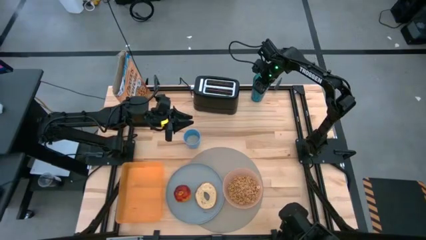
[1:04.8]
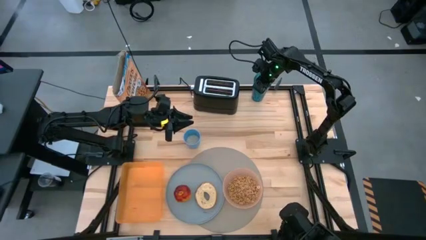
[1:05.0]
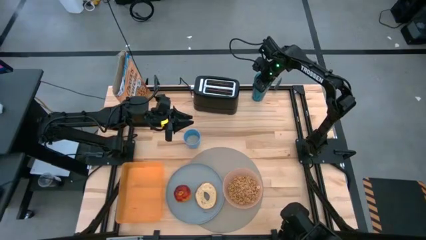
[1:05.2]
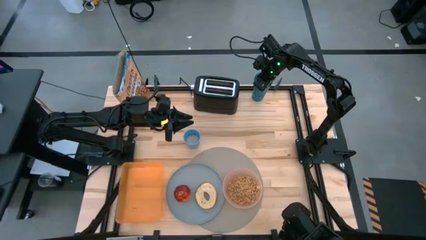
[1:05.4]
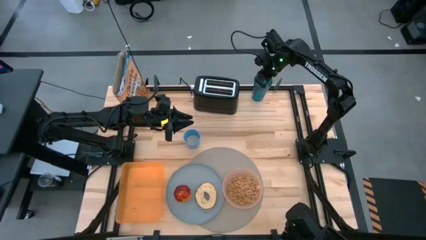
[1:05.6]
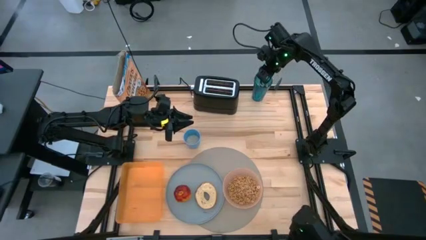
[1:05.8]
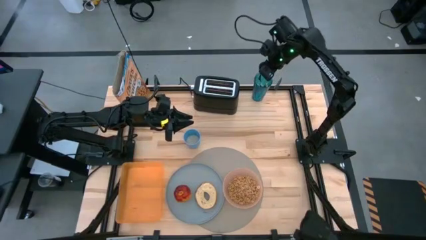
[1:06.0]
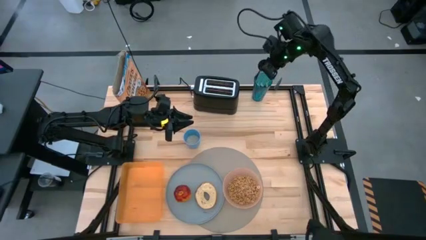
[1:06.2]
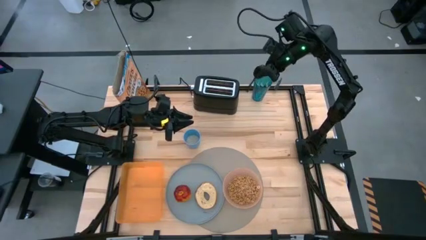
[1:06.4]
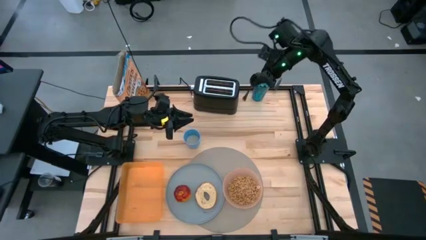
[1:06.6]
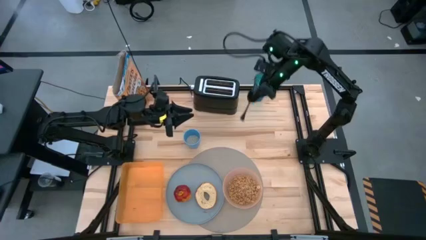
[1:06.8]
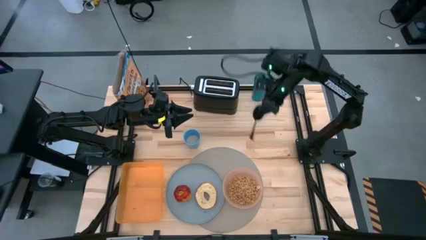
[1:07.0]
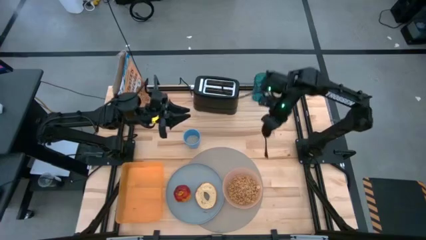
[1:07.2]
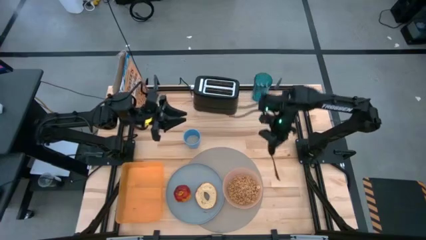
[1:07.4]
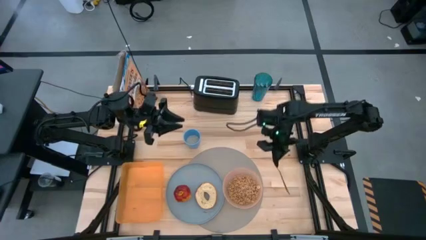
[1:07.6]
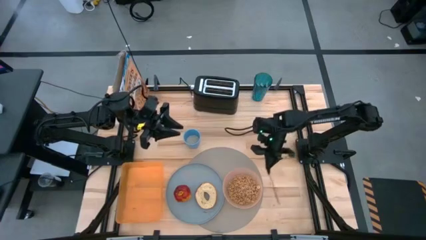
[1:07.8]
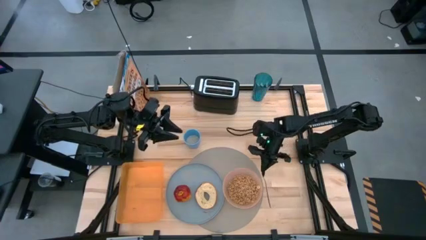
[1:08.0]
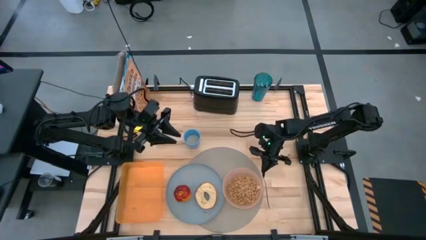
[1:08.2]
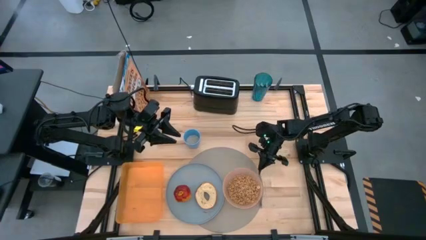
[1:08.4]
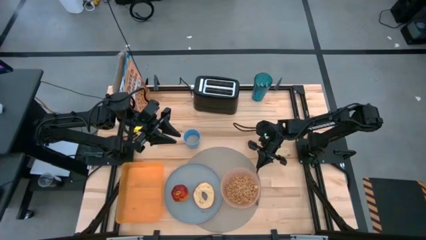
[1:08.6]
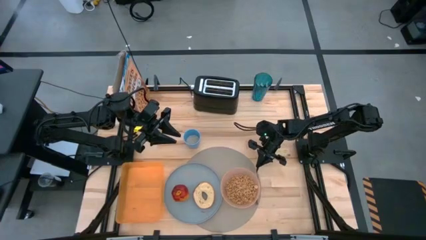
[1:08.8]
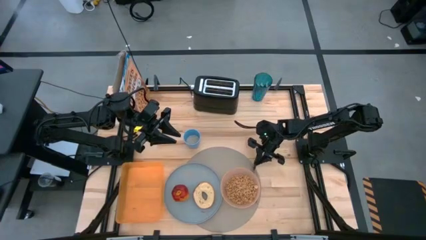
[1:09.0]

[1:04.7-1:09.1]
Task: Arrange a breakfast setting
Put the black spoon beside the pink bowl on the table mat

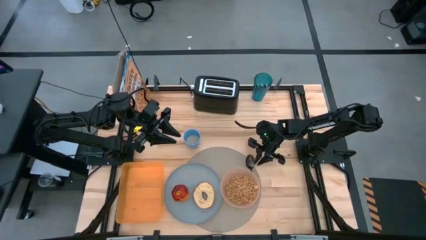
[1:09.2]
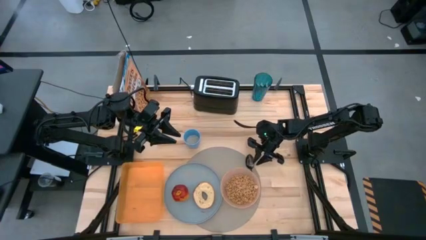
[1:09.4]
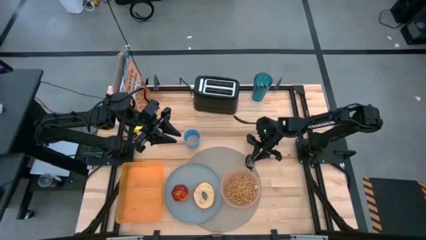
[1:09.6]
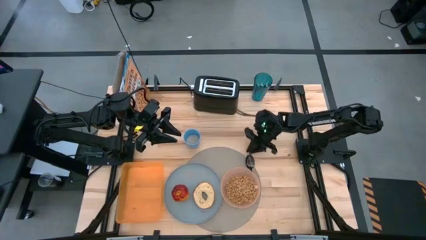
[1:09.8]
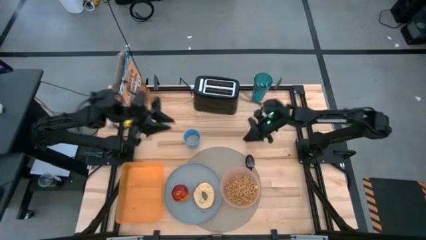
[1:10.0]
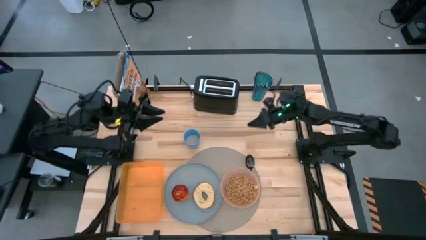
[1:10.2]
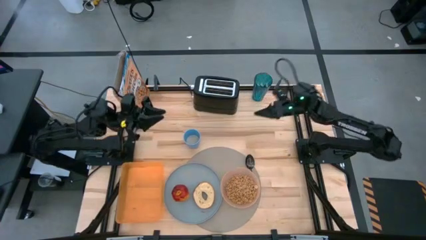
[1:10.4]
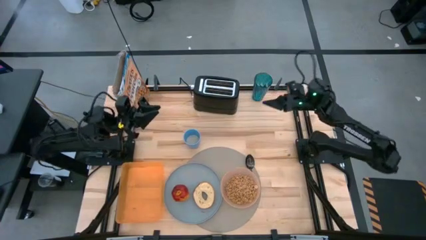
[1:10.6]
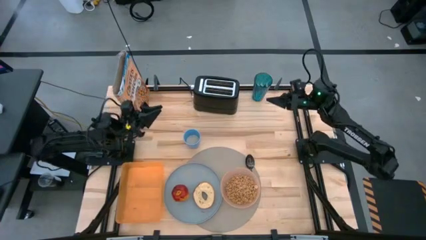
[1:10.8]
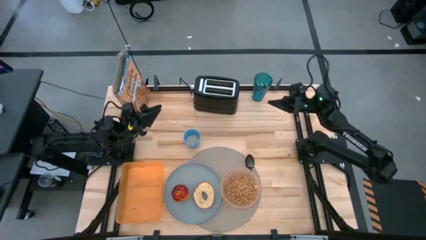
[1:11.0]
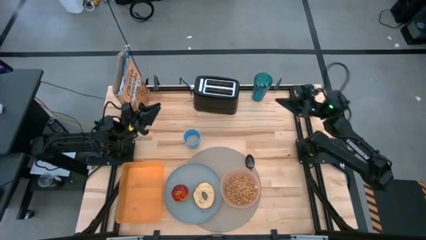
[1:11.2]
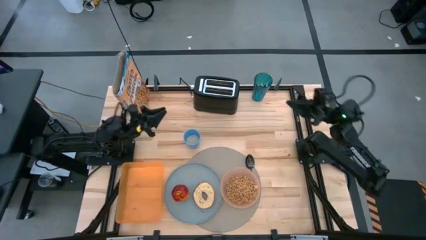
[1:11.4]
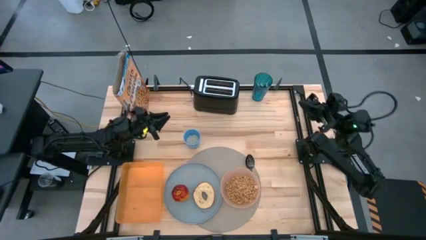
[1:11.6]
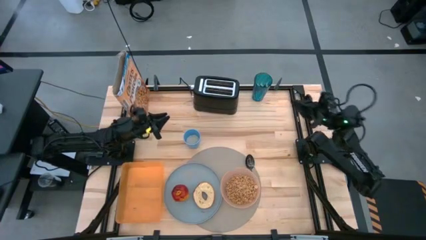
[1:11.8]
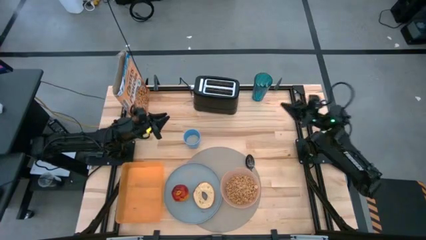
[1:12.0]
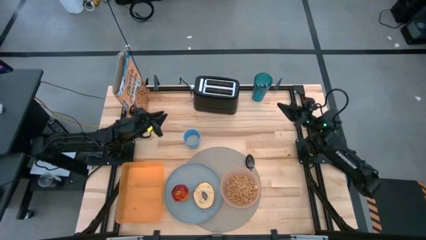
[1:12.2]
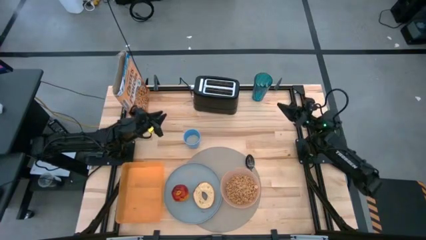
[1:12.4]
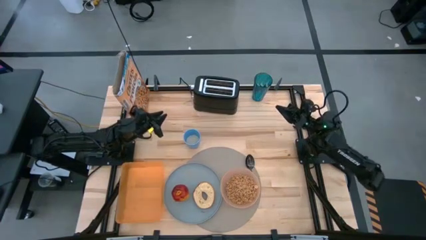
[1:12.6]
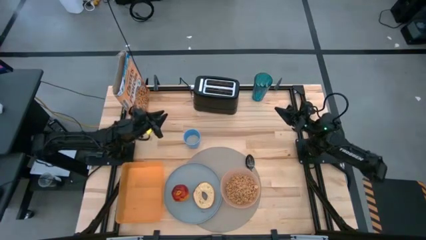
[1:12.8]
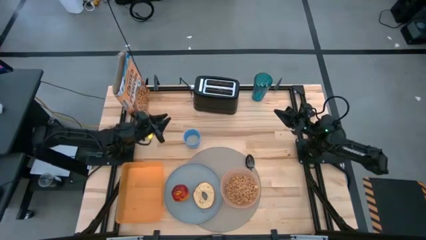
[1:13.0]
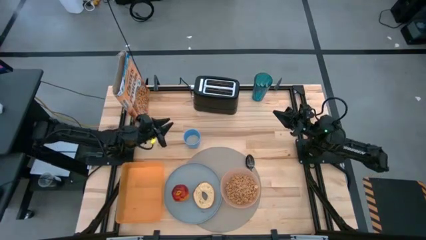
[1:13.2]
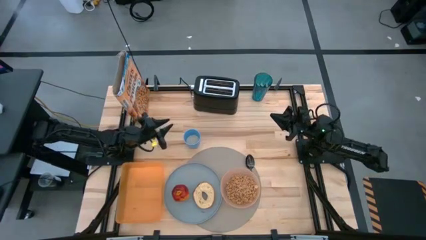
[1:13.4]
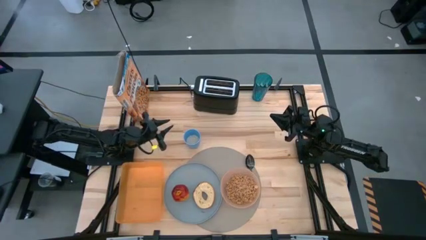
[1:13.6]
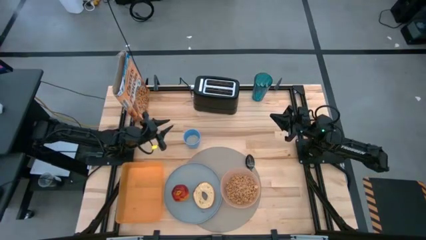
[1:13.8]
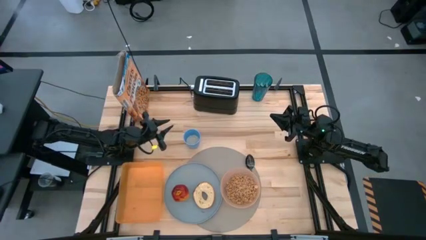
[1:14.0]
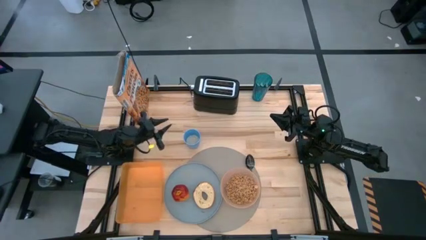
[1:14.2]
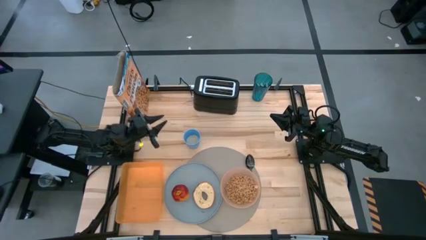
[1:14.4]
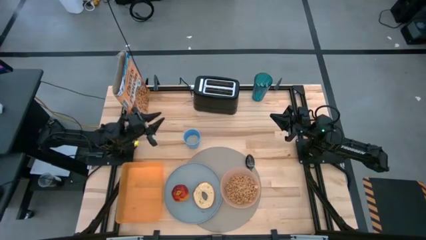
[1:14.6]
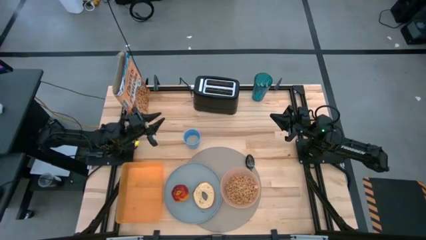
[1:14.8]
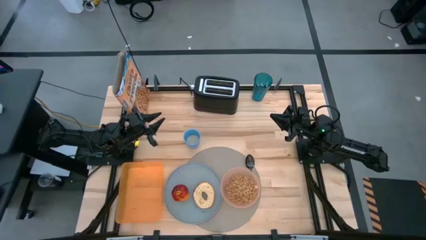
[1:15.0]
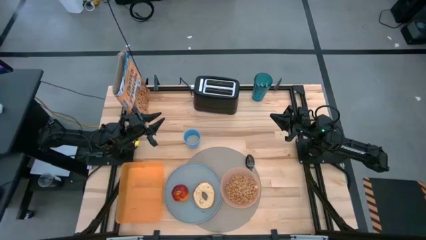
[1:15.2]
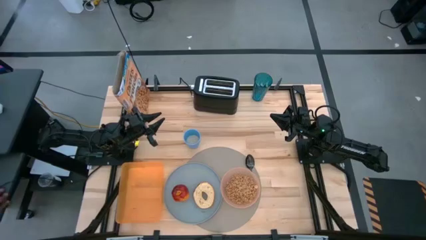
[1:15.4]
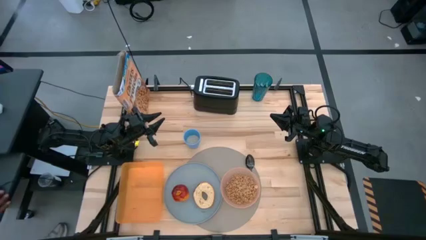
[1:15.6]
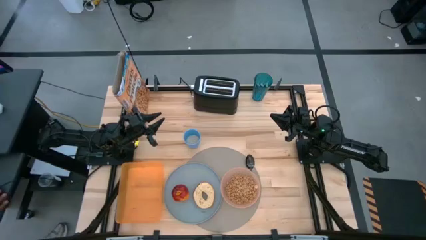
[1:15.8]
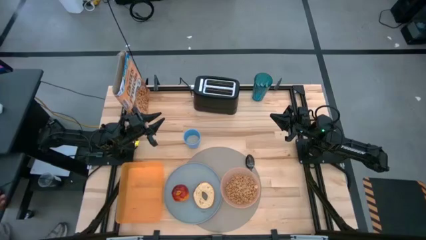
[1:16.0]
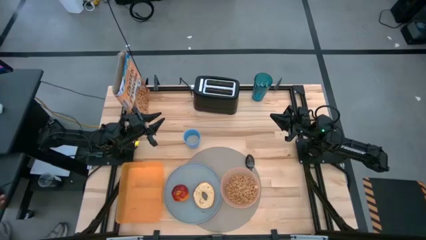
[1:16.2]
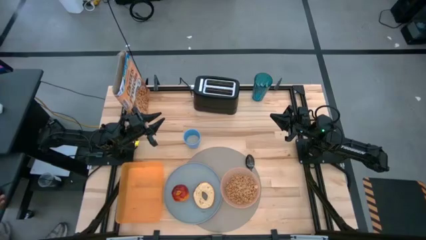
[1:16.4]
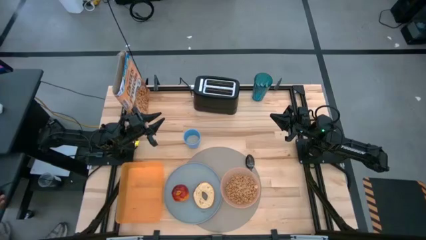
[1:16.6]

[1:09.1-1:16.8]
Return to Home Position
